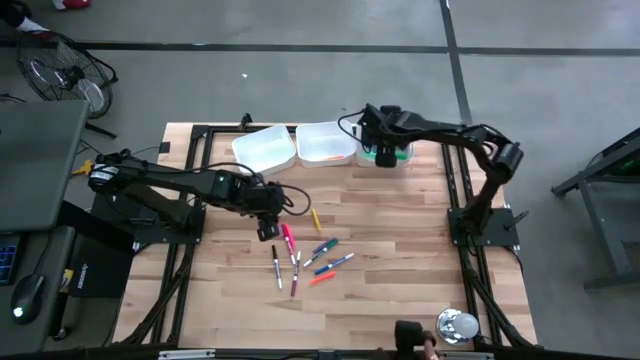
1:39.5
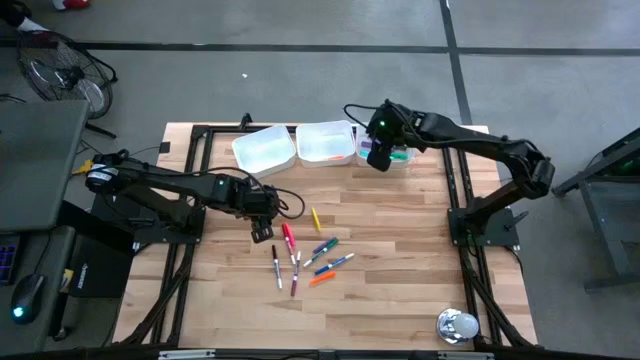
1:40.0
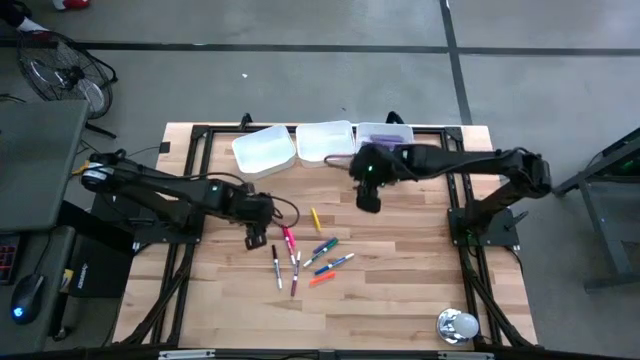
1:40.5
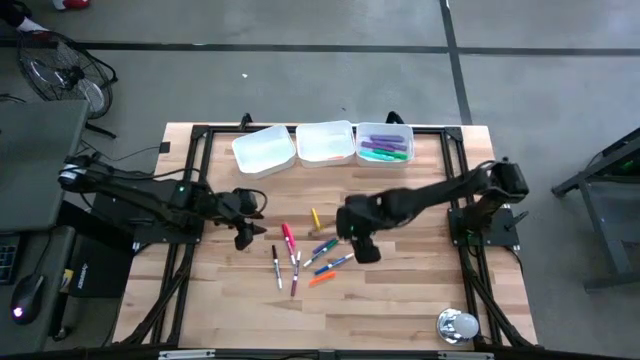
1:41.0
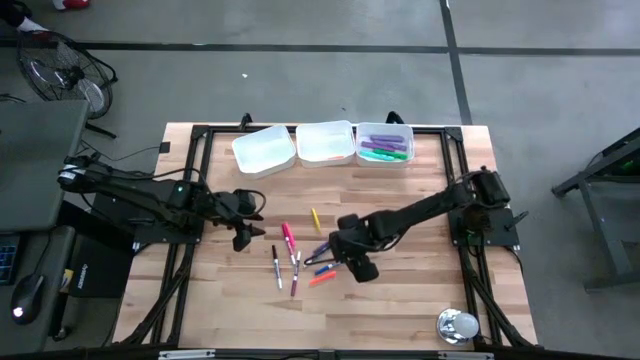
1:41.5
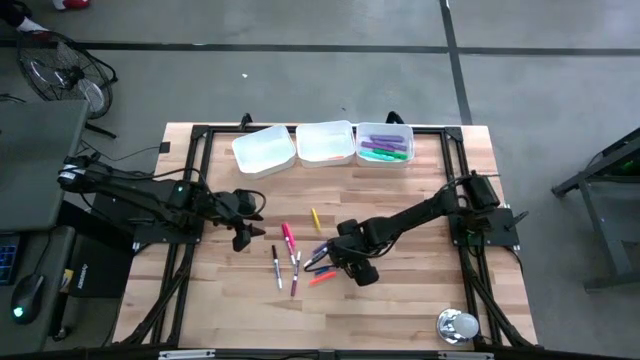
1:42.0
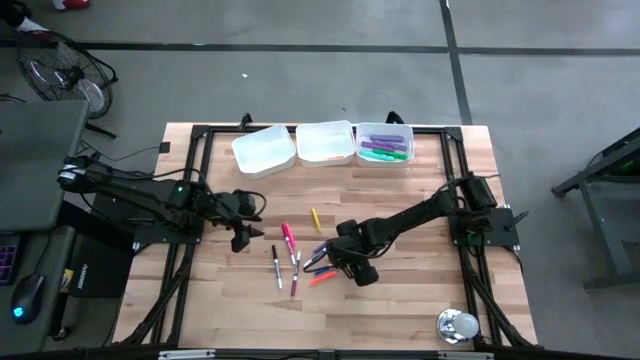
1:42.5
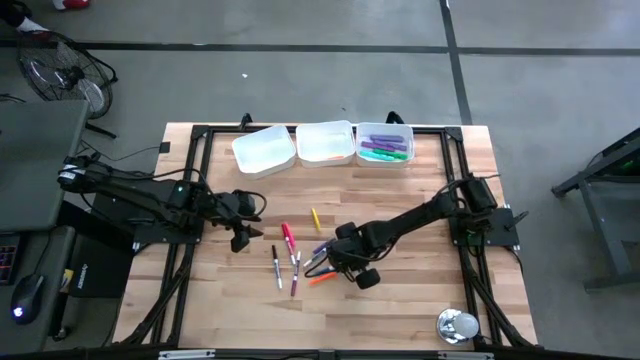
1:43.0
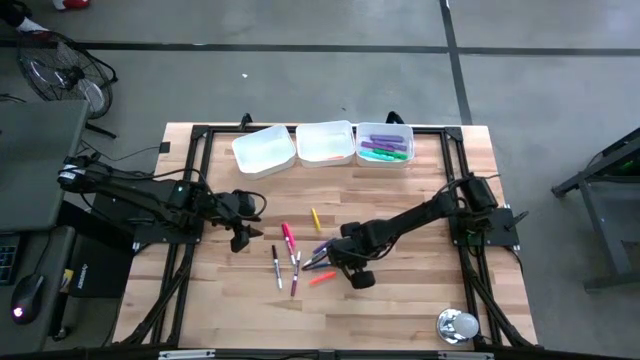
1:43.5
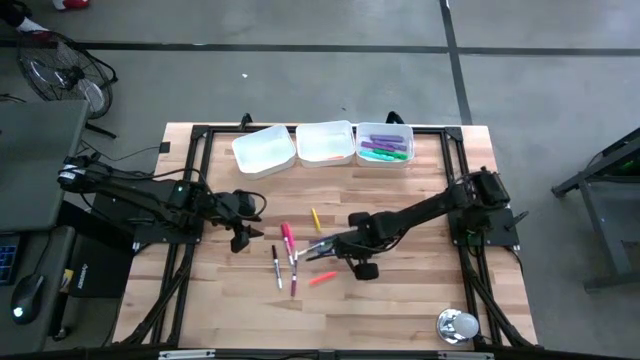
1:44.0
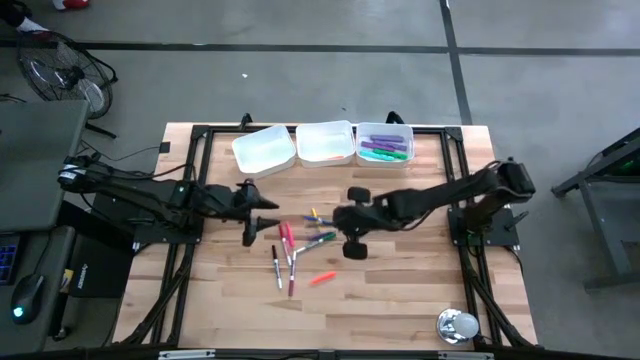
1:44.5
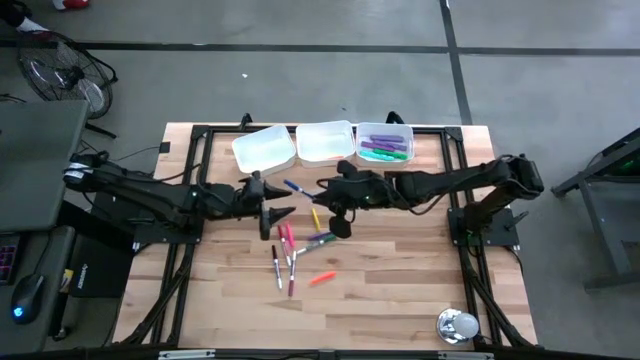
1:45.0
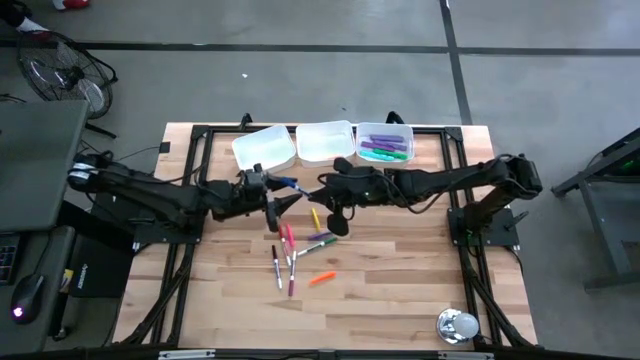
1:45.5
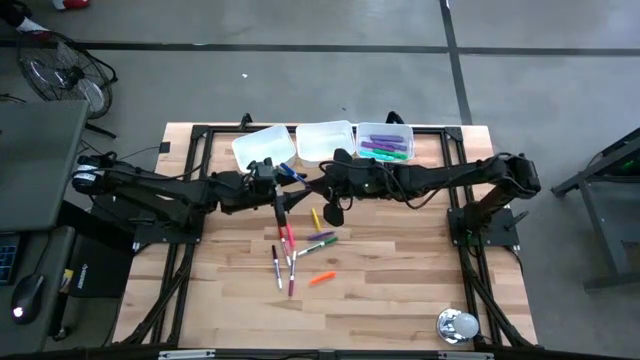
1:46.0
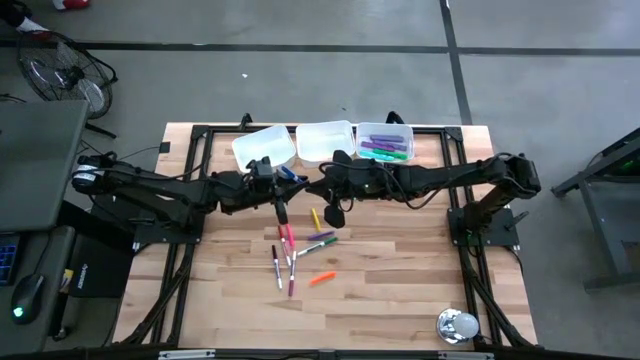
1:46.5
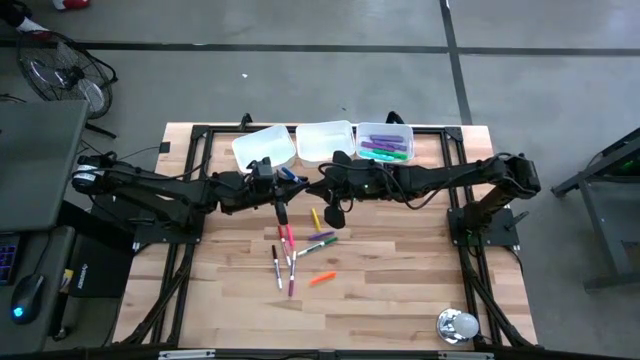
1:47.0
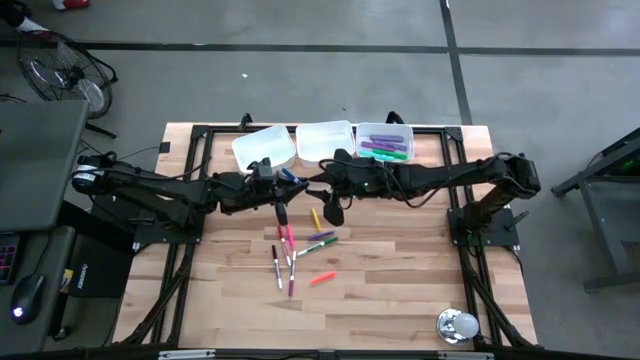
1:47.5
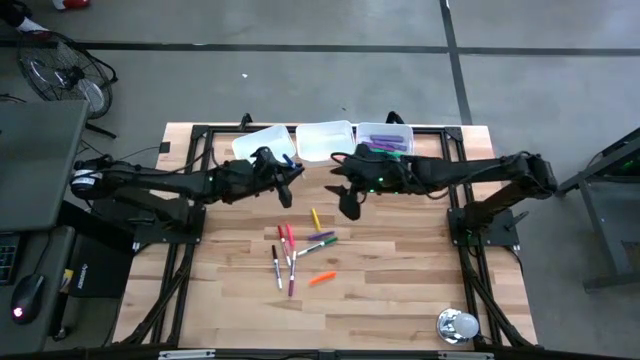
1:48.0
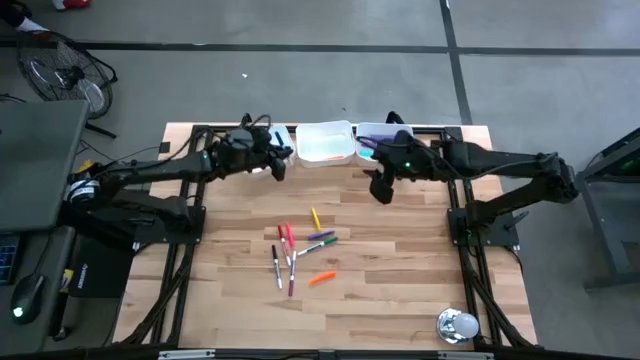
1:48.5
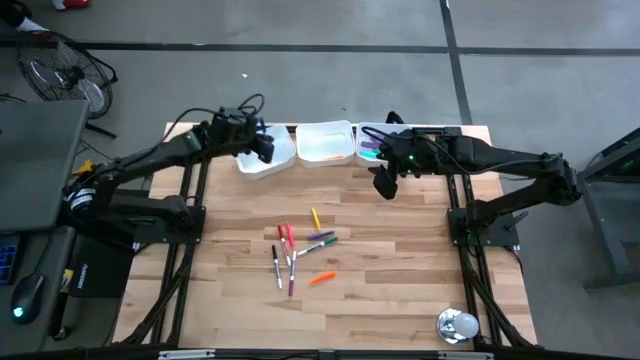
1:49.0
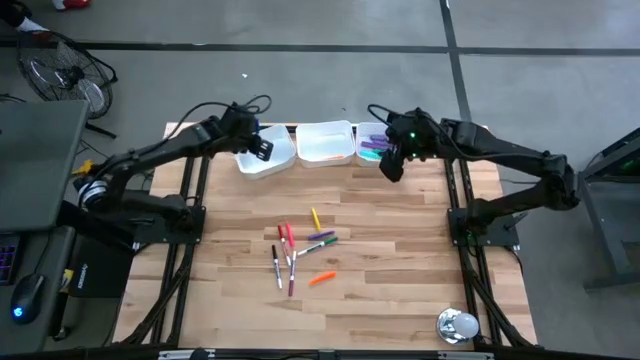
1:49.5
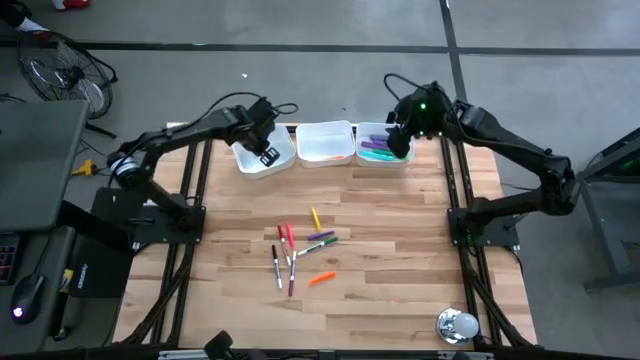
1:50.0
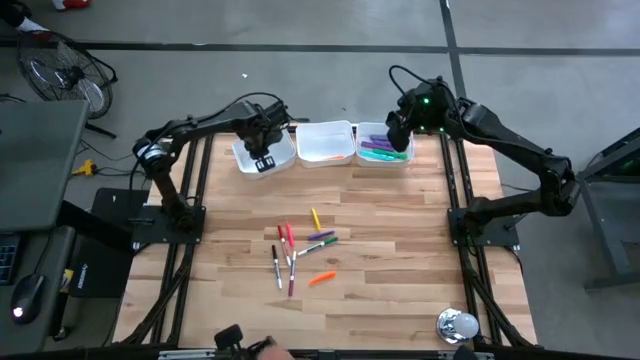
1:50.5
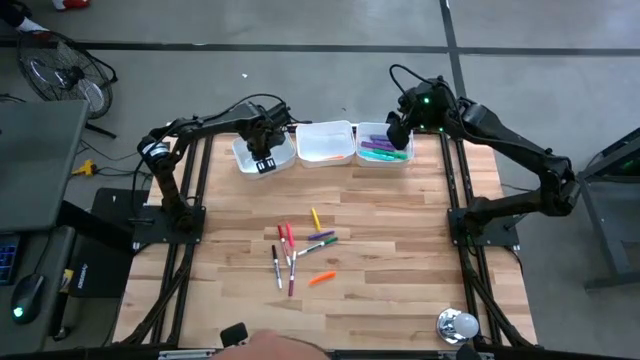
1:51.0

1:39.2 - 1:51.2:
Task: Pick & Place Markers
Put the blue marker pen into the left white bin

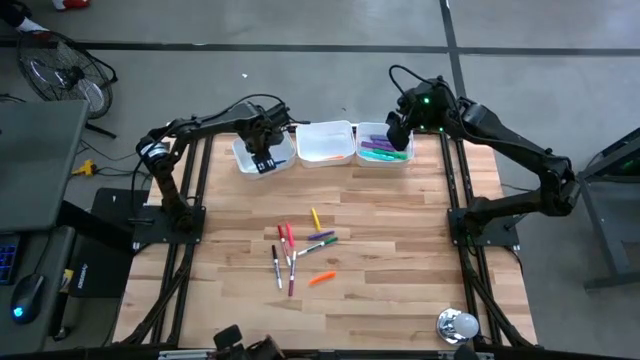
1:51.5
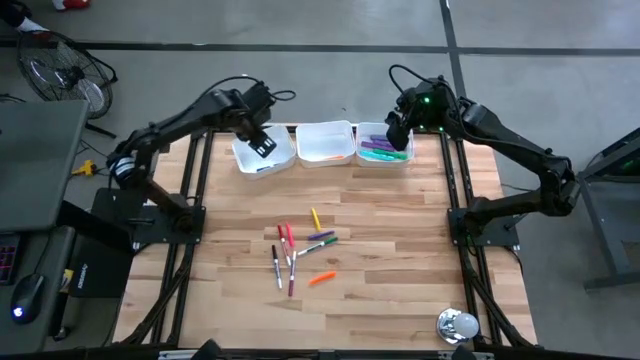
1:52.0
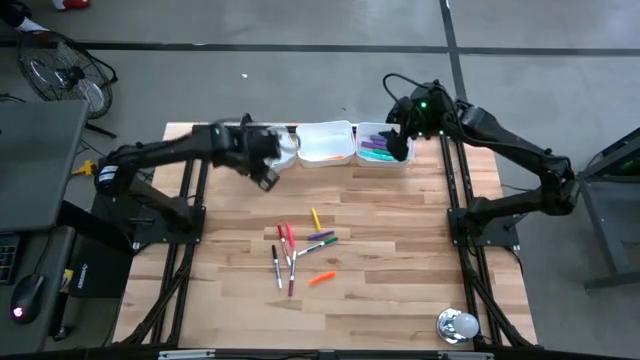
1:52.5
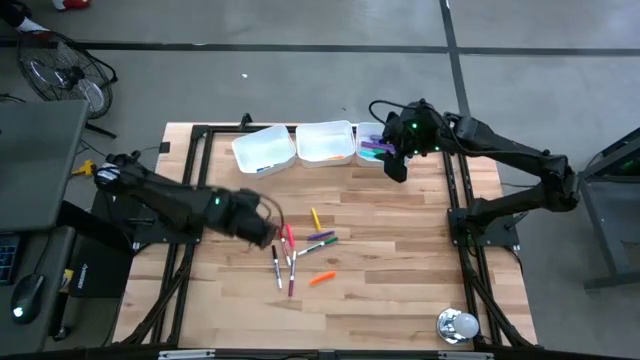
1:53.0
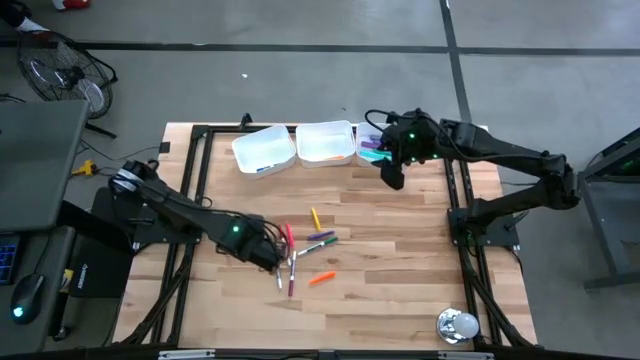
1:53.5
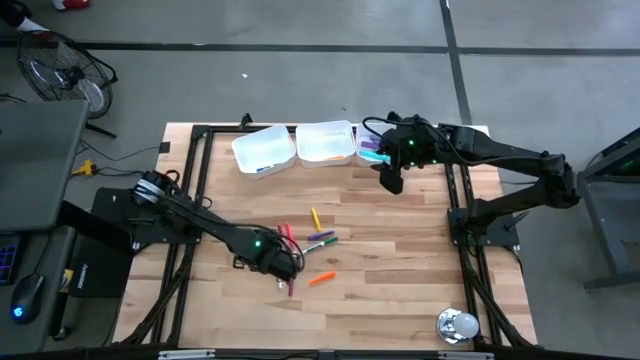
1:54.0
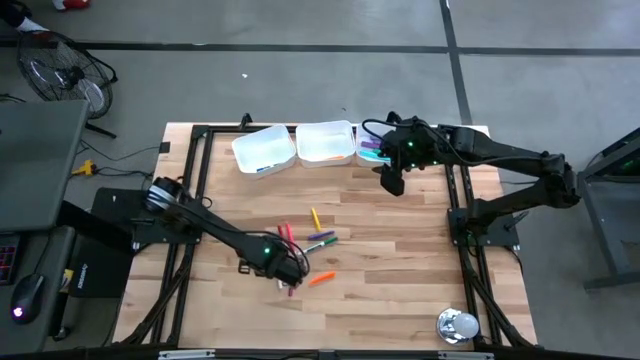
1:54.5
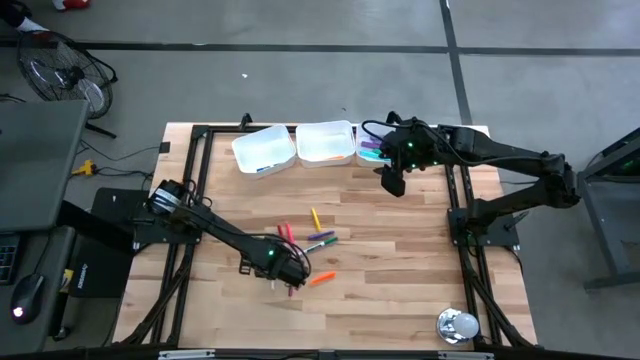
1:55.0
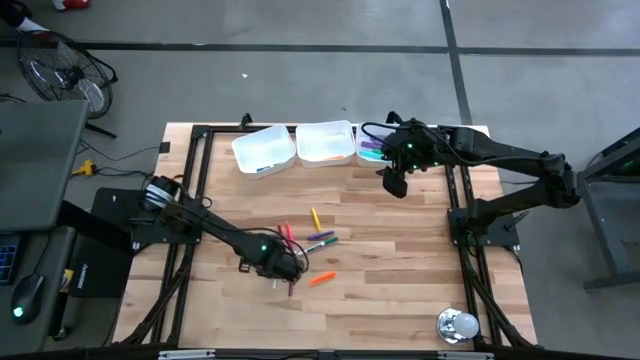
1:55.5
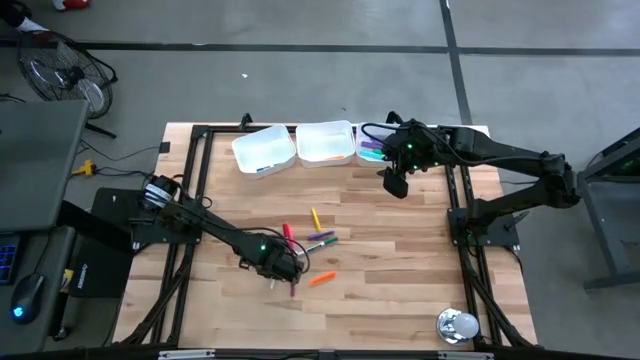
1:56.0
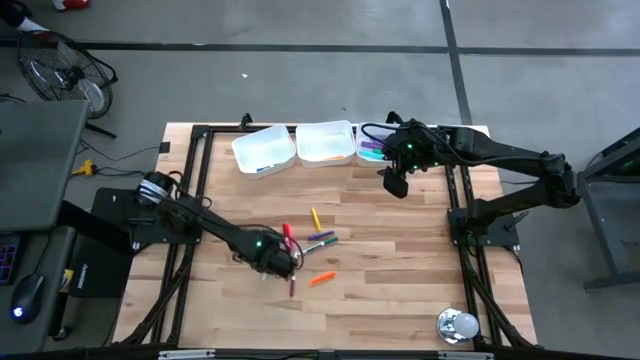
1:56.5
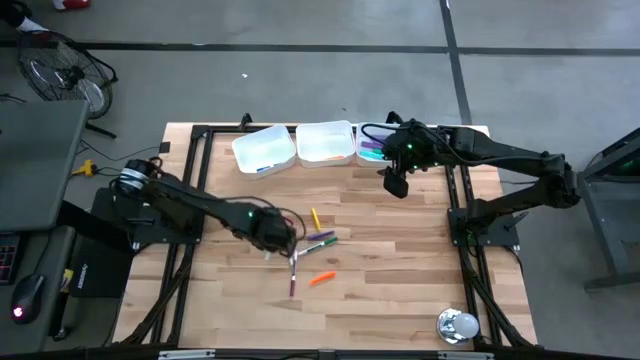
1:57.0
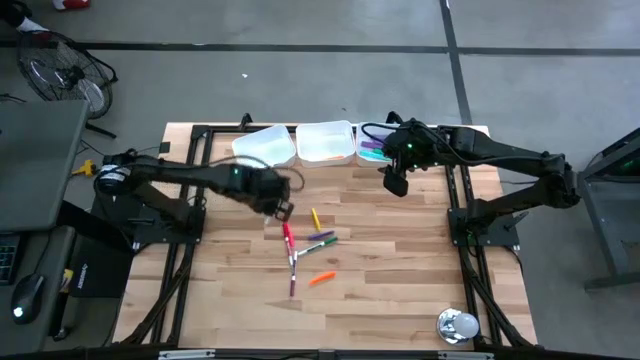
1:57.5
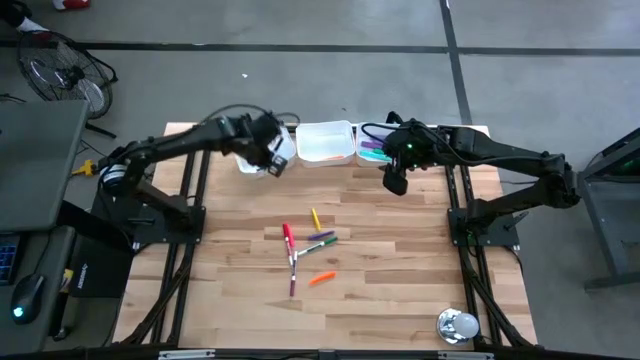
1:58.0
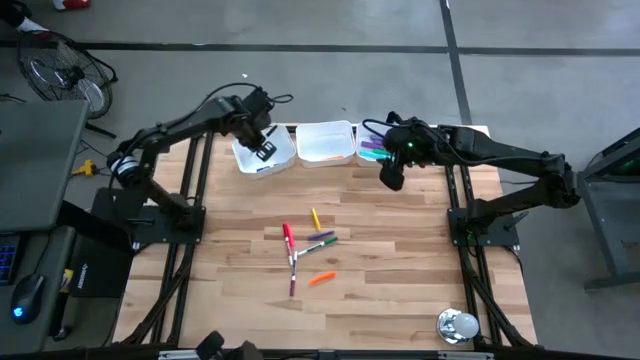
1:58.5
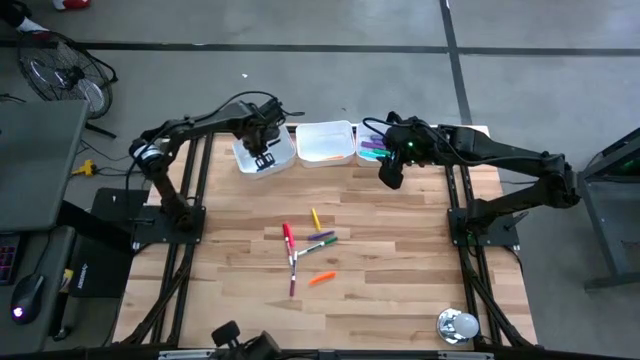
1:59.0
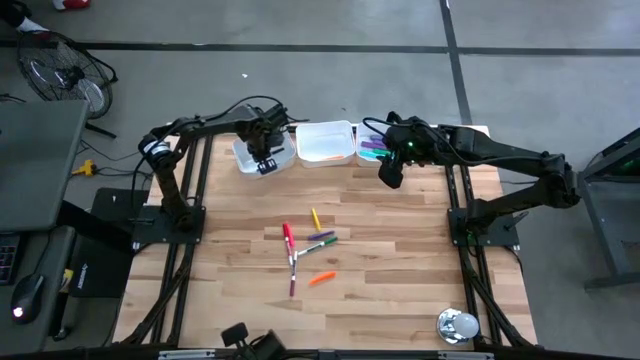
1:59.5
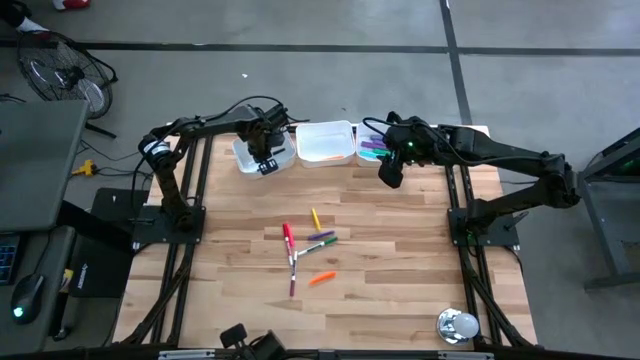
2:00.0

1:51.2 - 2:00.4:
Put the black marker pen into the left white bin

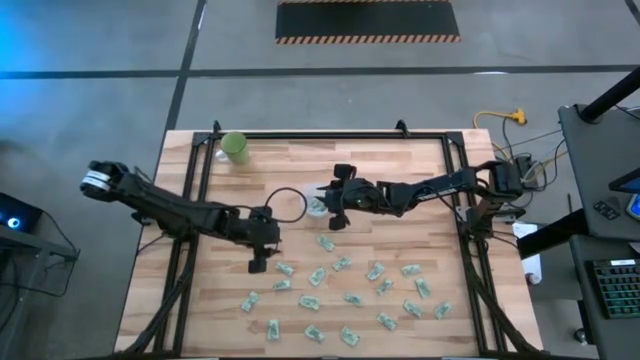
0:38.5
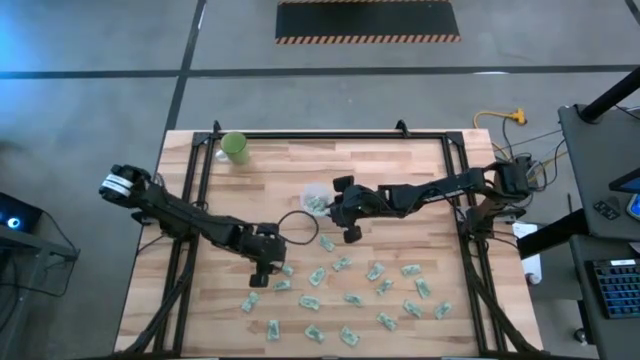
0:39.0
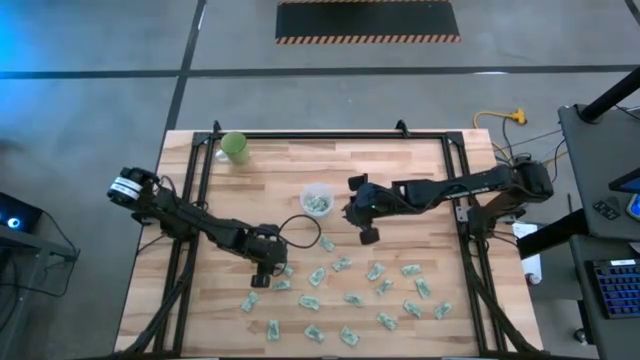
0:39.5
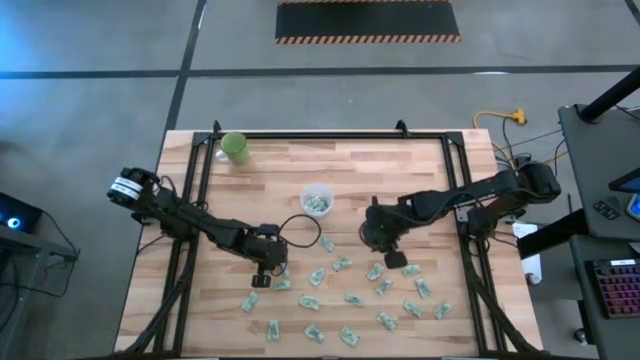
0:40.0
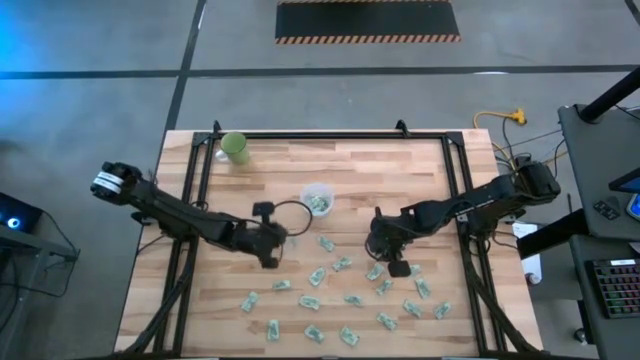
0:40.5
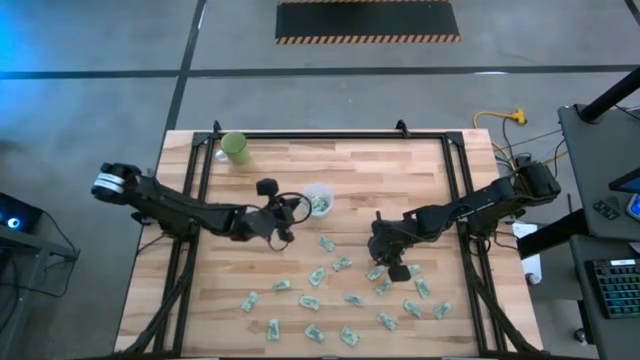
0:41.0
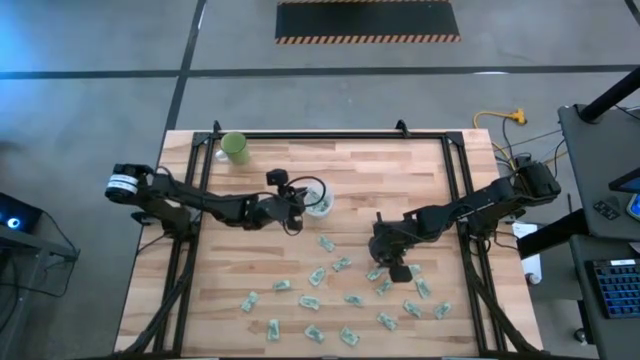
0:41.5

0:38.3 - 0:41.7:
Task: Pick and place Stevia / Truvia into bins
Put the green stevia packet into the transparent container
